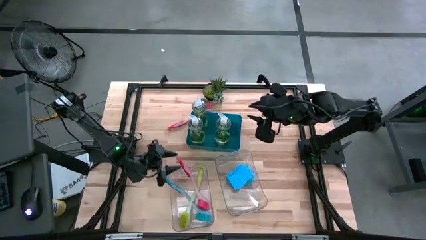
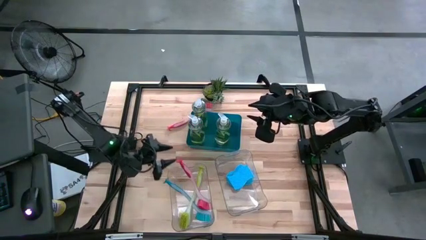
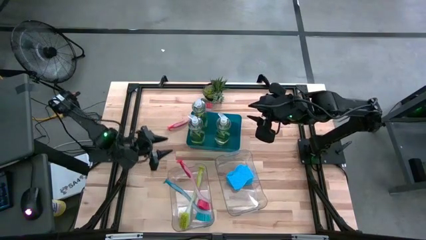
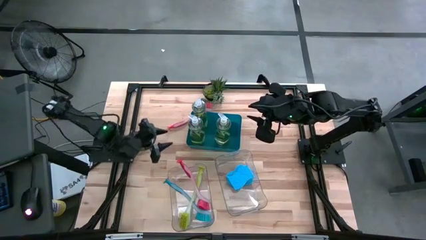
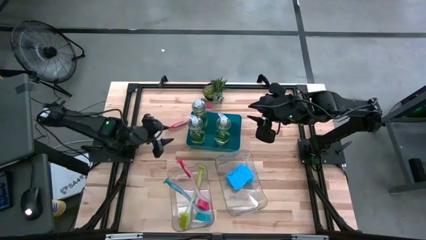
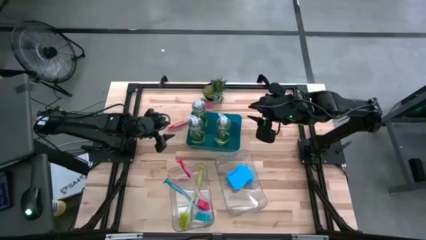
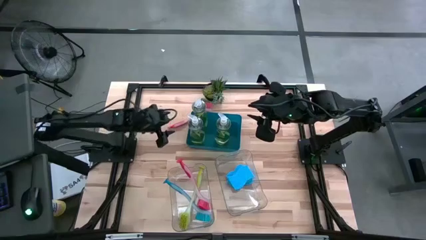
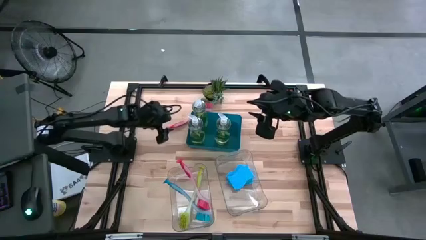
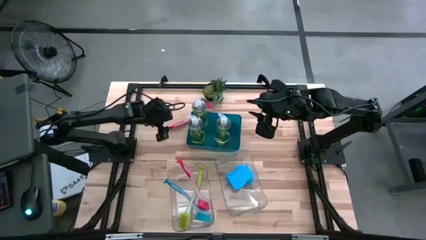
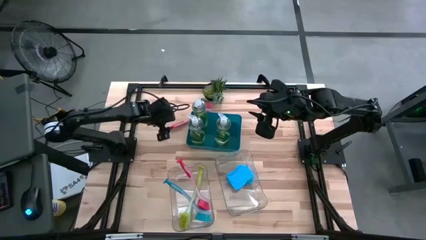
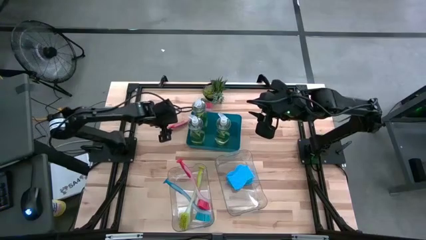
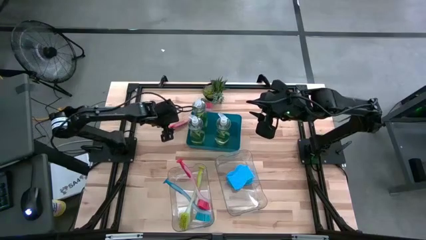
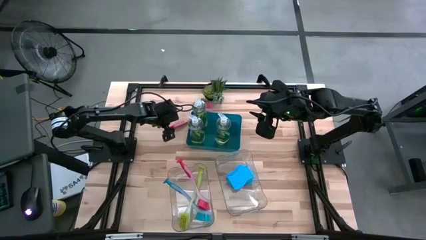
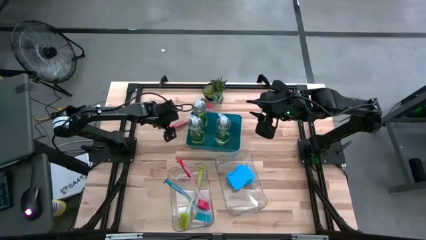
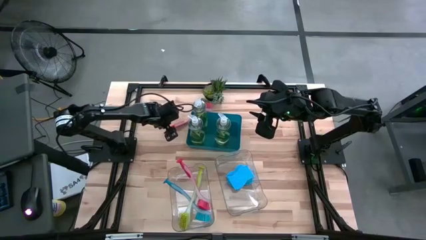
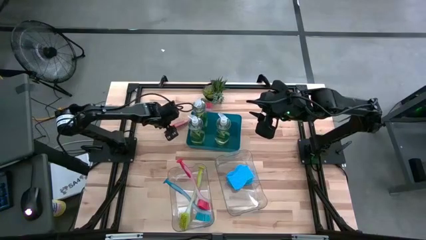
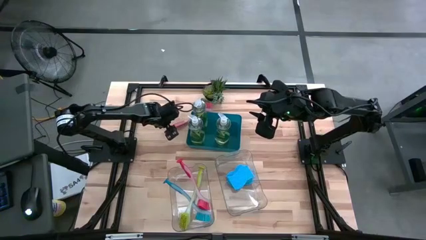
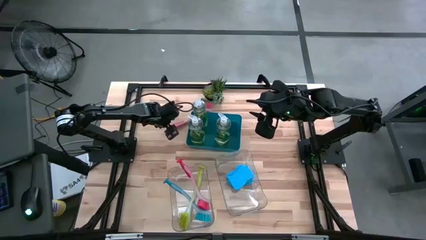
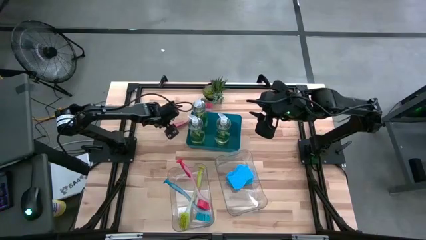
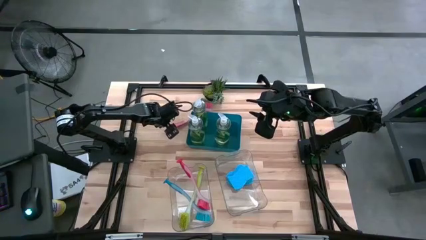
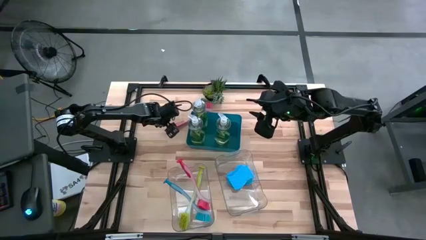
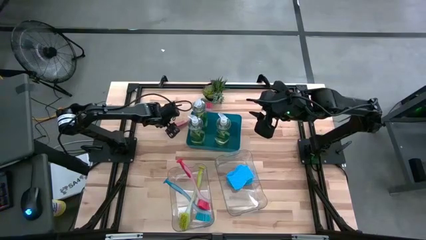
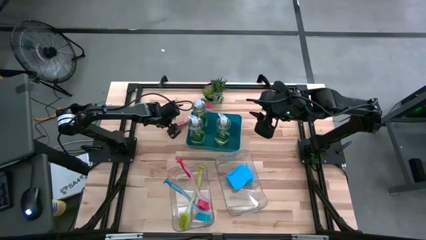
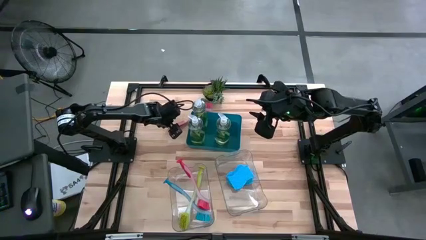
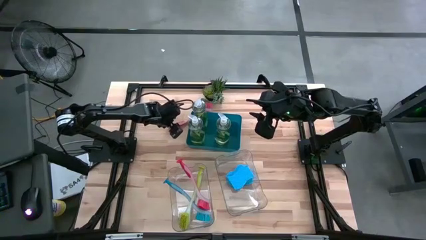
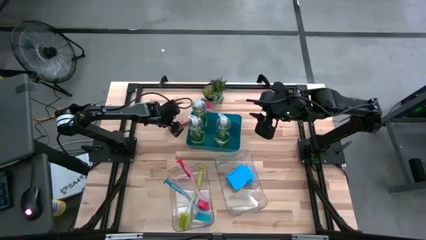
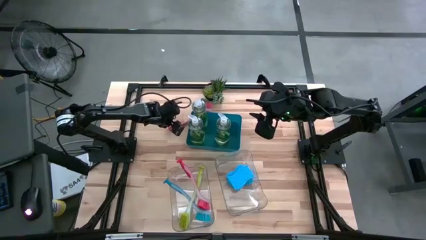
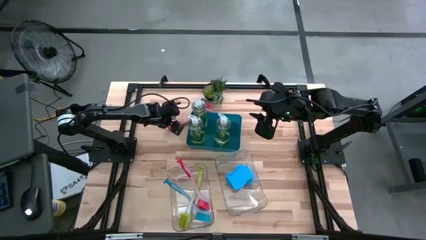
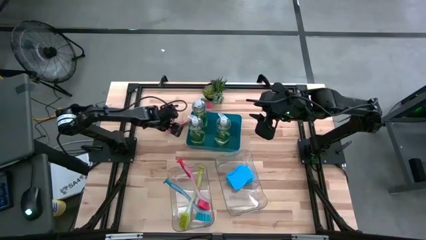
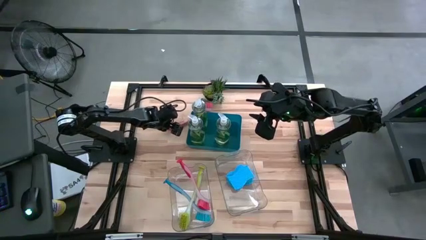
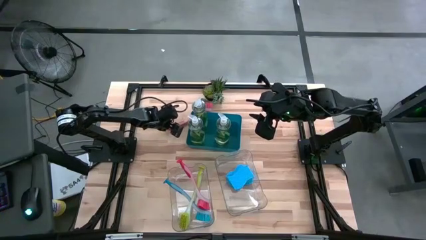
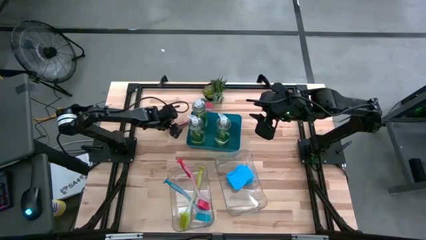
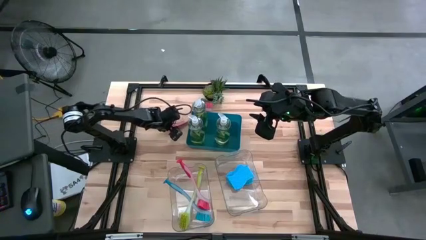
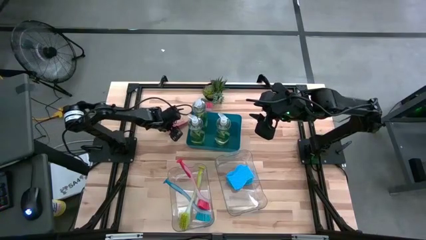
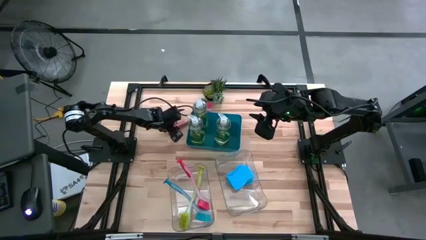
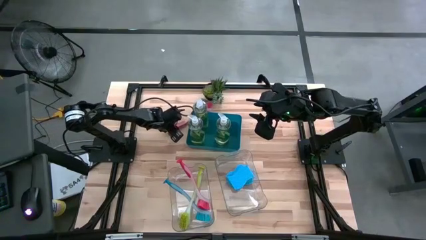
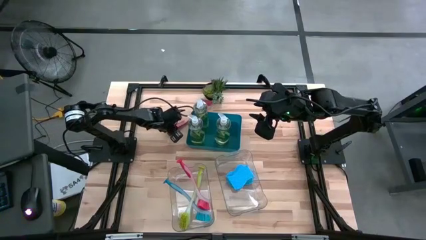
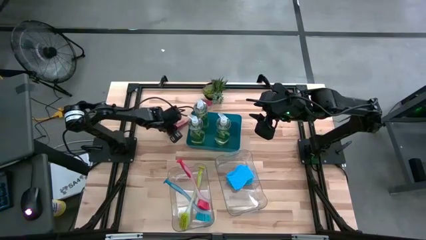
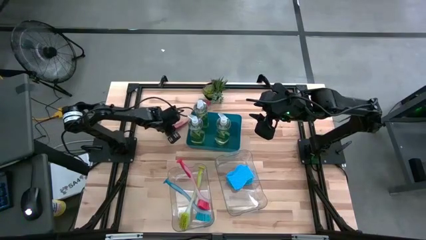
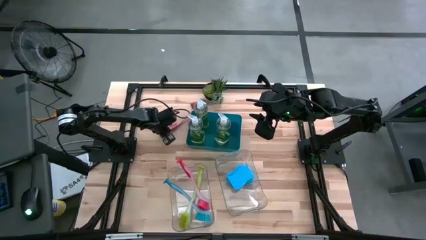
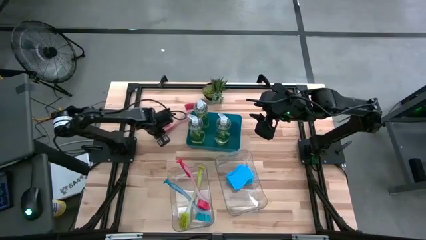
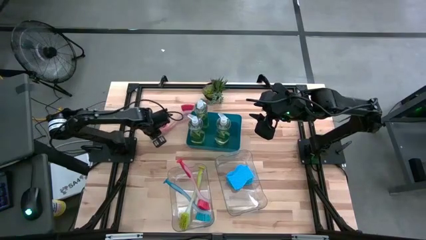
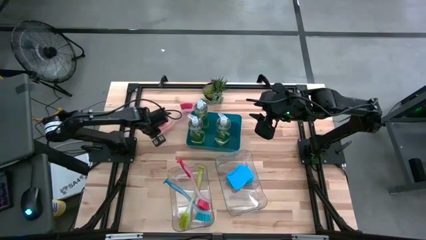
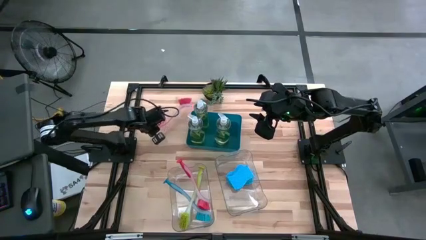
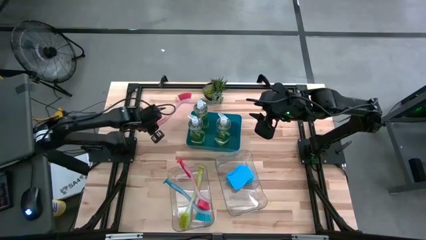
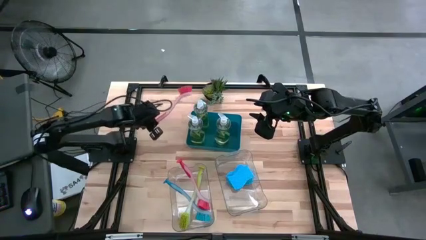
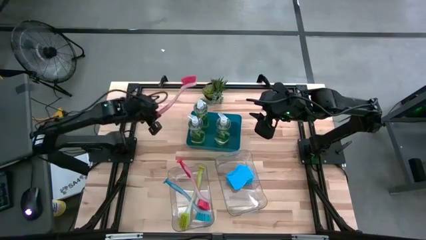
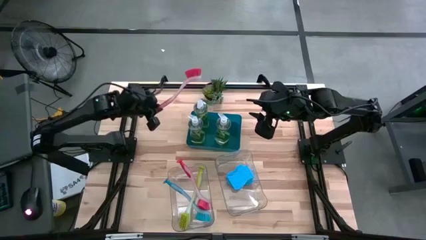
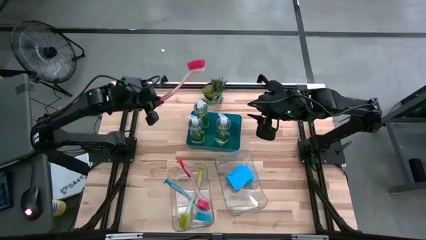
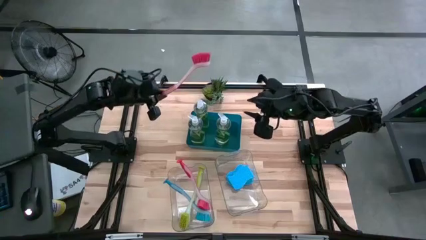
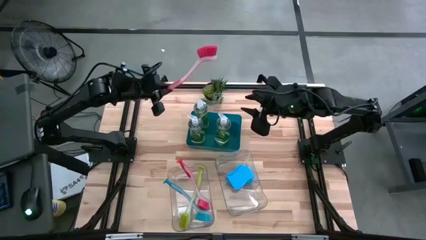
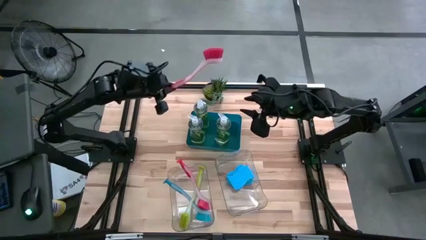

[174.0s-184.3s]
Task: Pick & Place Kitchen Sink Supplies
Put the red dish brush into the left transparent bin
